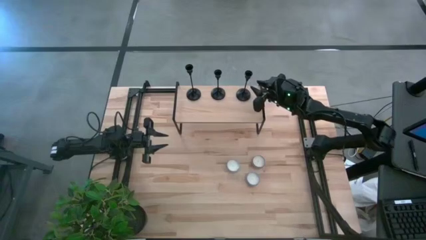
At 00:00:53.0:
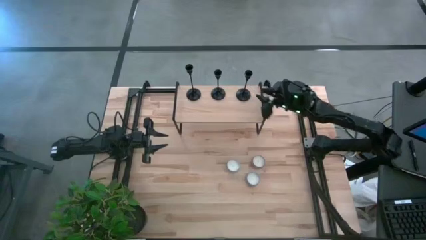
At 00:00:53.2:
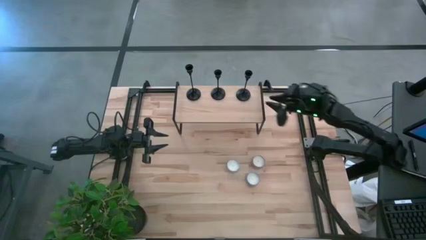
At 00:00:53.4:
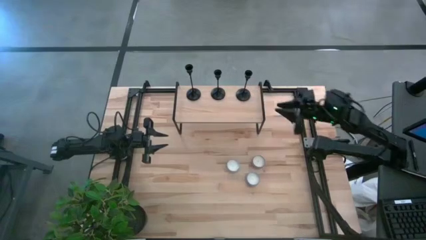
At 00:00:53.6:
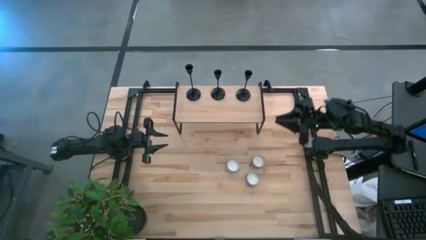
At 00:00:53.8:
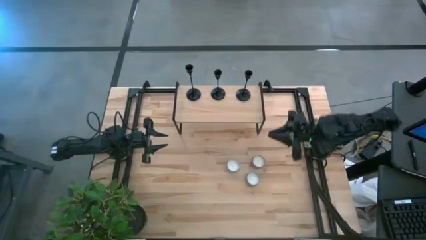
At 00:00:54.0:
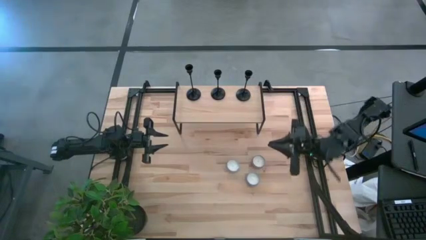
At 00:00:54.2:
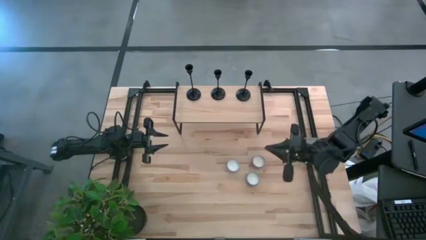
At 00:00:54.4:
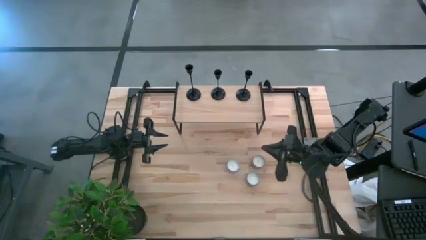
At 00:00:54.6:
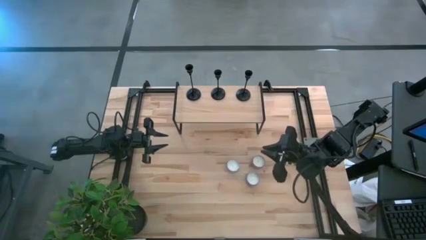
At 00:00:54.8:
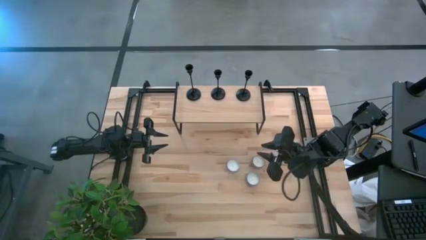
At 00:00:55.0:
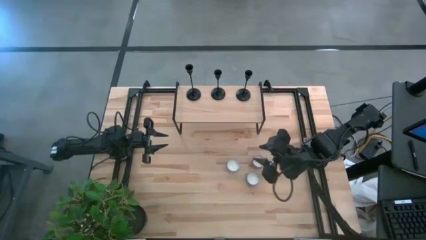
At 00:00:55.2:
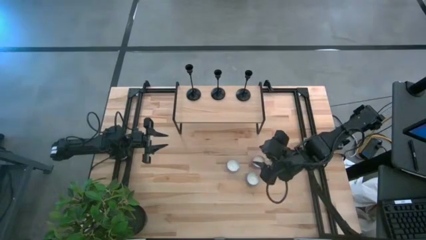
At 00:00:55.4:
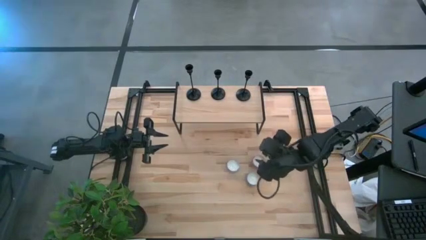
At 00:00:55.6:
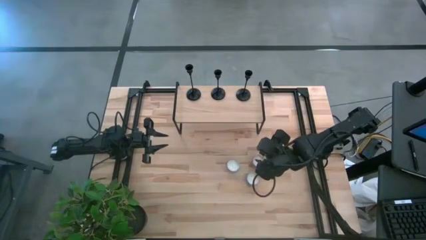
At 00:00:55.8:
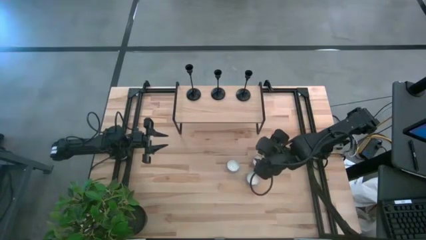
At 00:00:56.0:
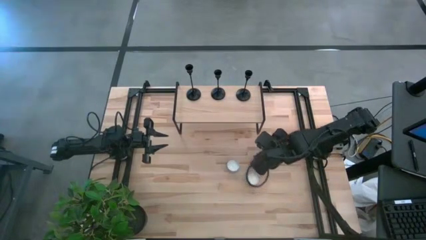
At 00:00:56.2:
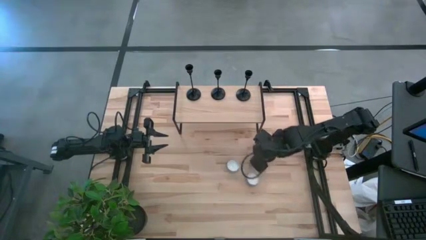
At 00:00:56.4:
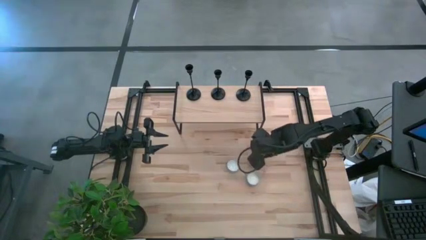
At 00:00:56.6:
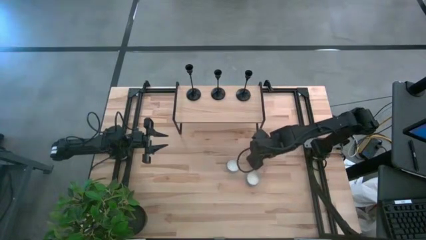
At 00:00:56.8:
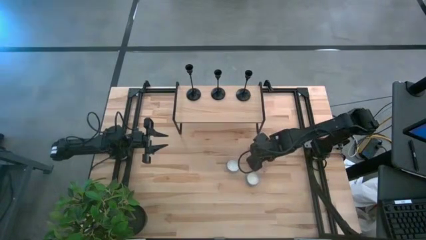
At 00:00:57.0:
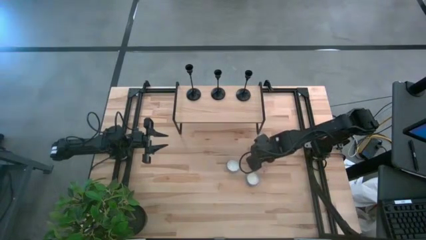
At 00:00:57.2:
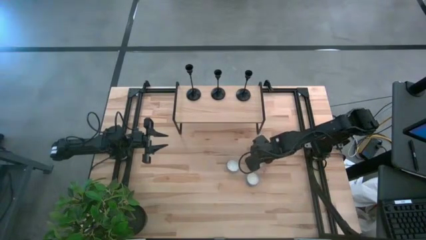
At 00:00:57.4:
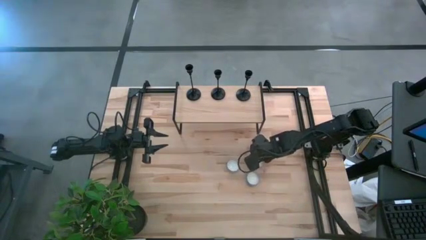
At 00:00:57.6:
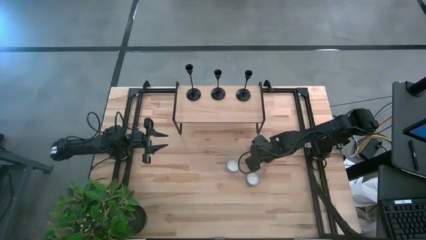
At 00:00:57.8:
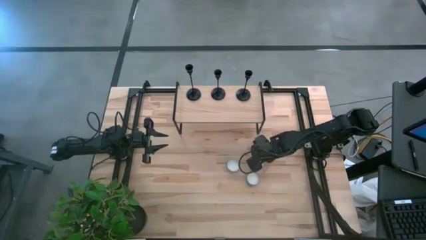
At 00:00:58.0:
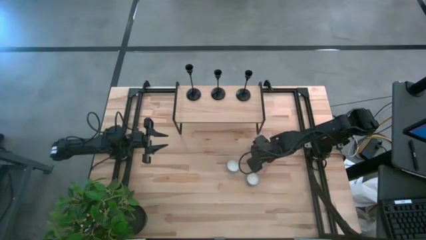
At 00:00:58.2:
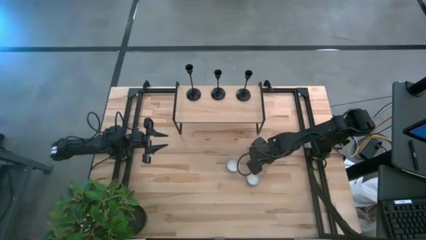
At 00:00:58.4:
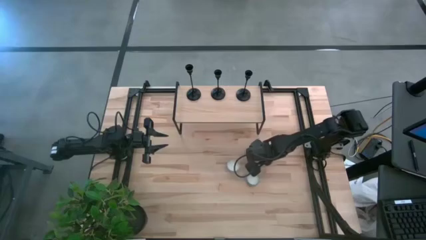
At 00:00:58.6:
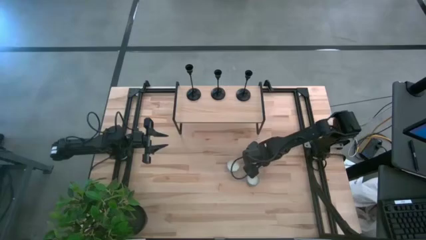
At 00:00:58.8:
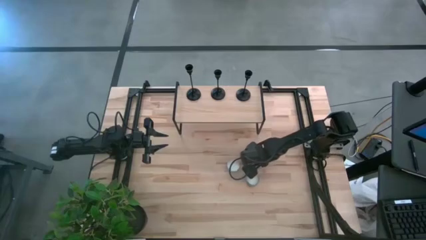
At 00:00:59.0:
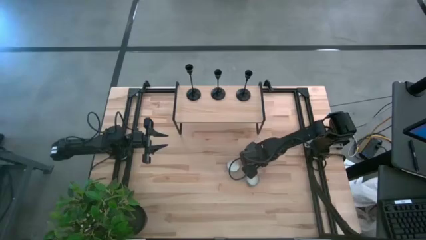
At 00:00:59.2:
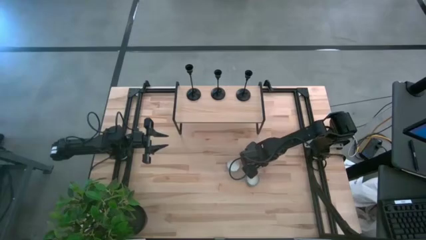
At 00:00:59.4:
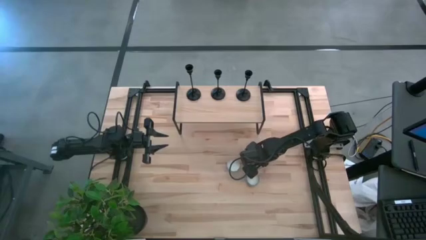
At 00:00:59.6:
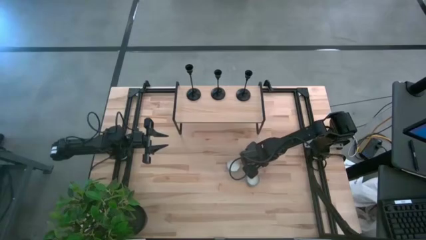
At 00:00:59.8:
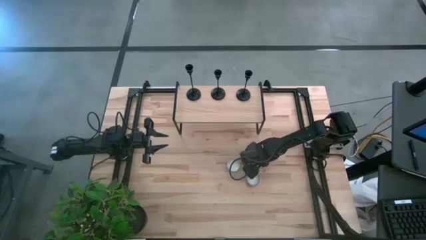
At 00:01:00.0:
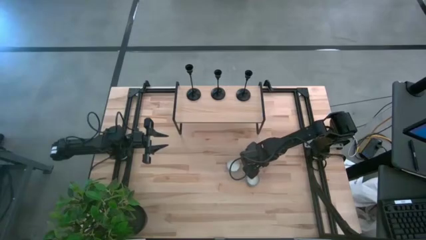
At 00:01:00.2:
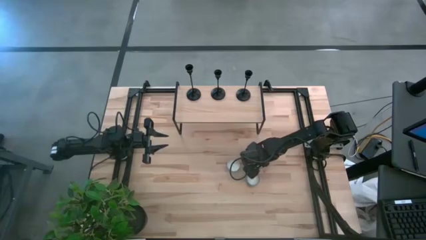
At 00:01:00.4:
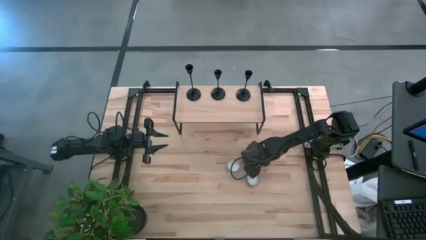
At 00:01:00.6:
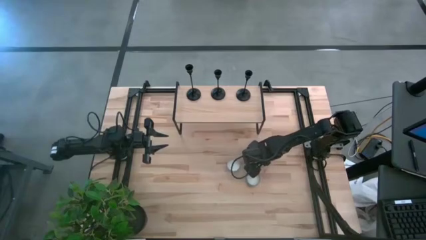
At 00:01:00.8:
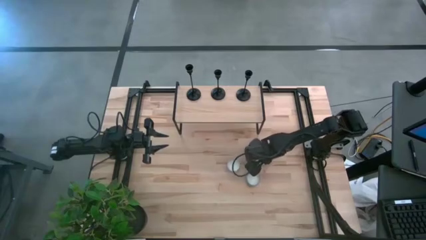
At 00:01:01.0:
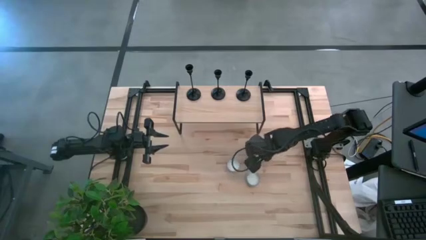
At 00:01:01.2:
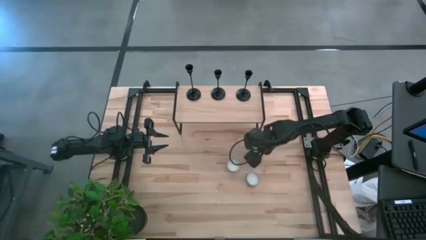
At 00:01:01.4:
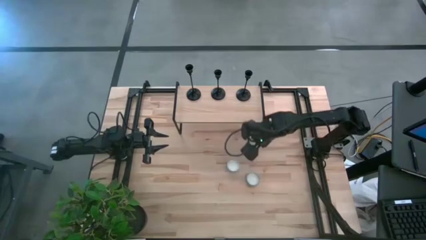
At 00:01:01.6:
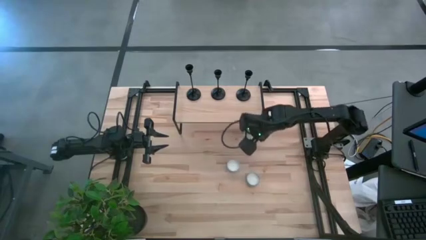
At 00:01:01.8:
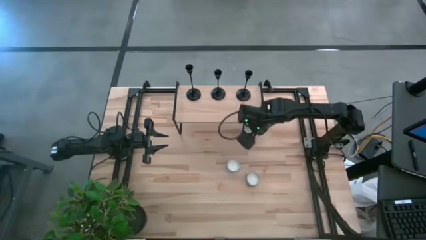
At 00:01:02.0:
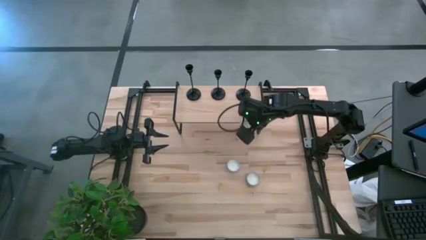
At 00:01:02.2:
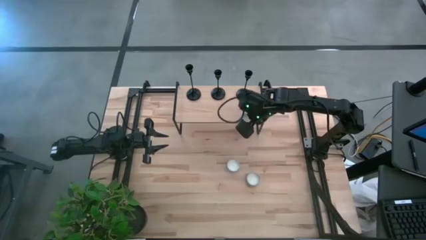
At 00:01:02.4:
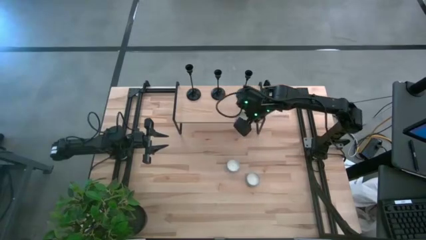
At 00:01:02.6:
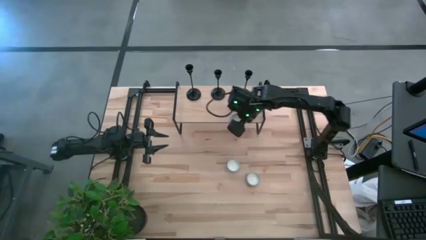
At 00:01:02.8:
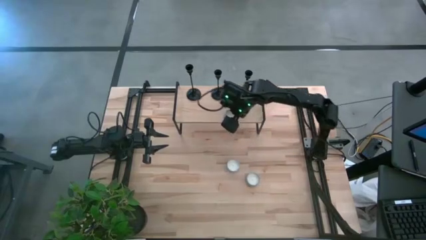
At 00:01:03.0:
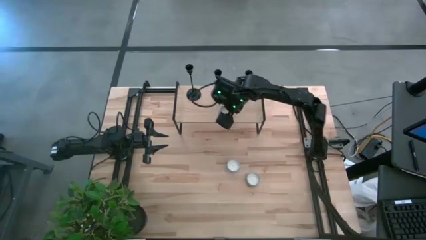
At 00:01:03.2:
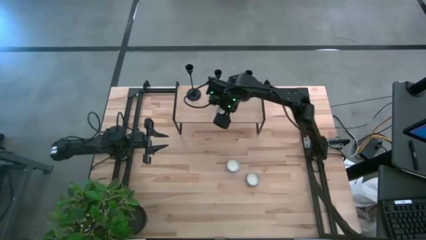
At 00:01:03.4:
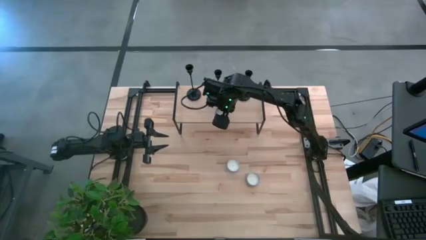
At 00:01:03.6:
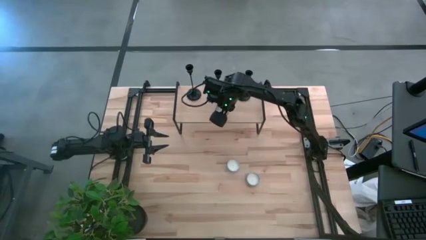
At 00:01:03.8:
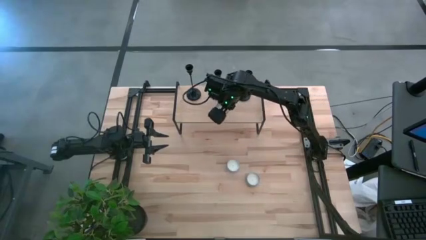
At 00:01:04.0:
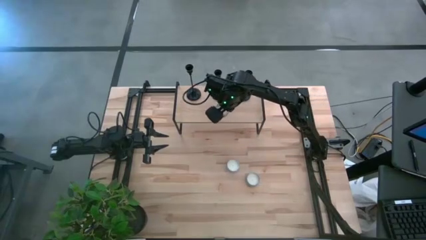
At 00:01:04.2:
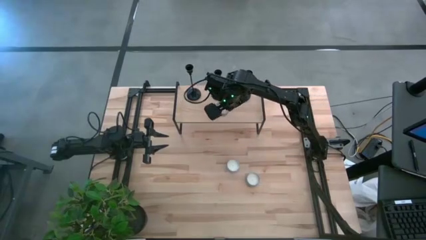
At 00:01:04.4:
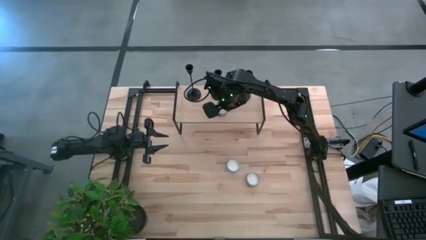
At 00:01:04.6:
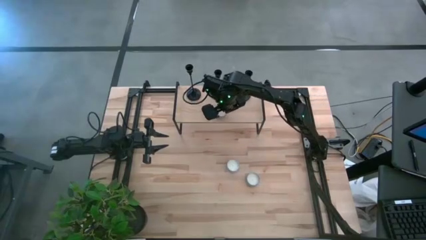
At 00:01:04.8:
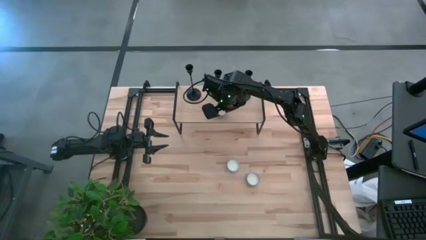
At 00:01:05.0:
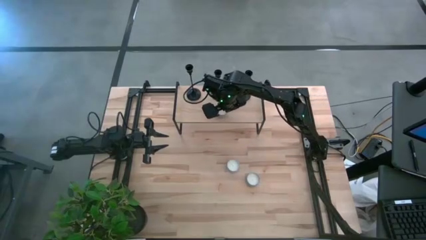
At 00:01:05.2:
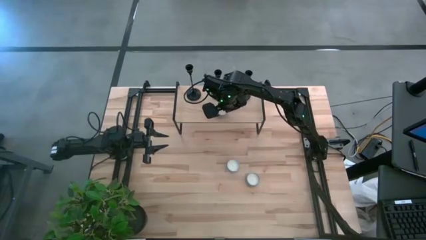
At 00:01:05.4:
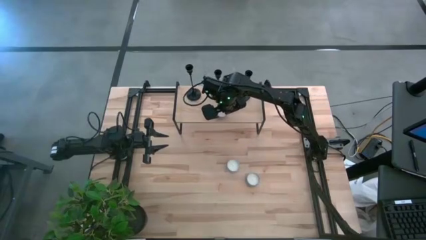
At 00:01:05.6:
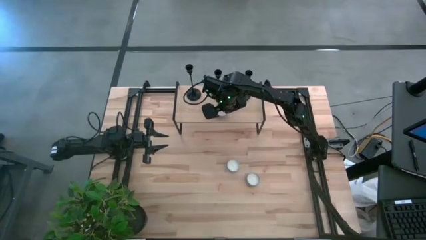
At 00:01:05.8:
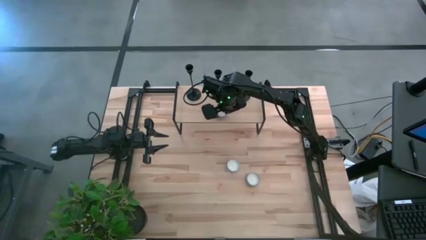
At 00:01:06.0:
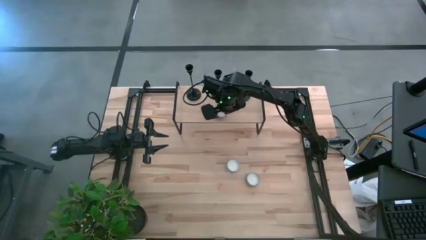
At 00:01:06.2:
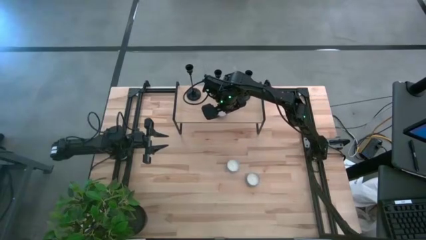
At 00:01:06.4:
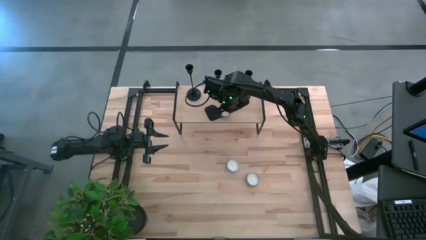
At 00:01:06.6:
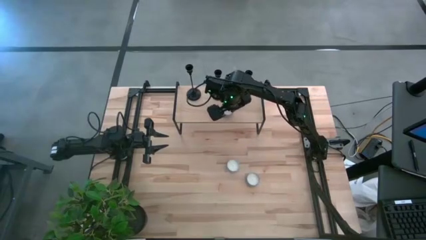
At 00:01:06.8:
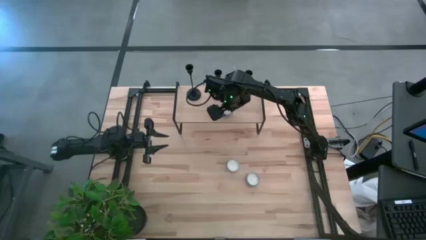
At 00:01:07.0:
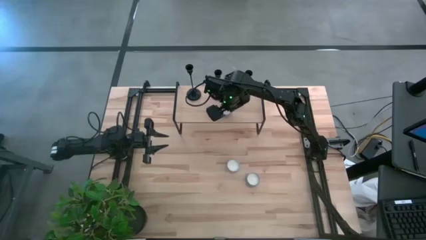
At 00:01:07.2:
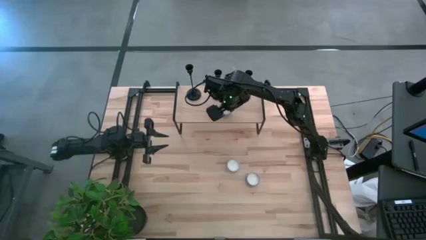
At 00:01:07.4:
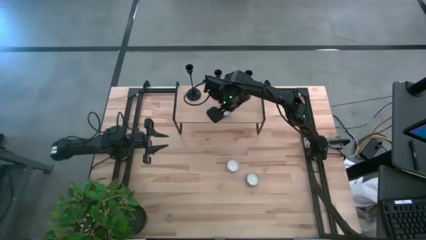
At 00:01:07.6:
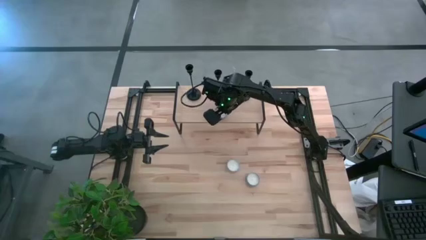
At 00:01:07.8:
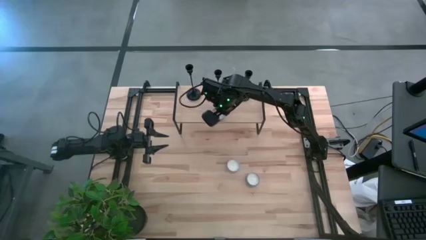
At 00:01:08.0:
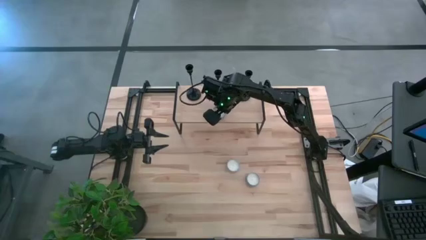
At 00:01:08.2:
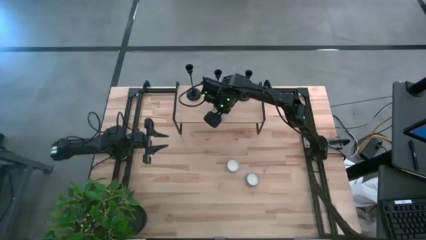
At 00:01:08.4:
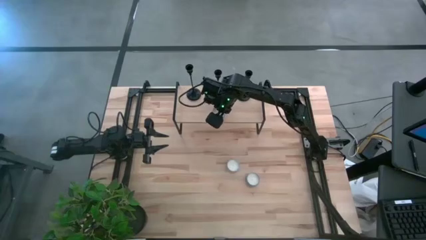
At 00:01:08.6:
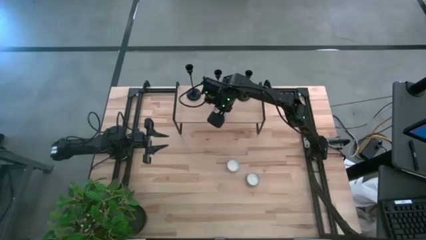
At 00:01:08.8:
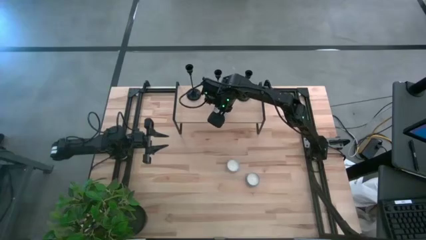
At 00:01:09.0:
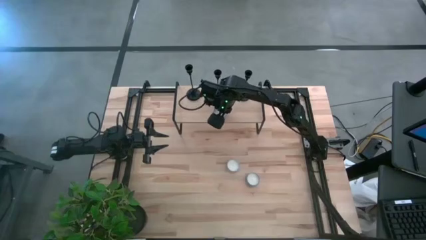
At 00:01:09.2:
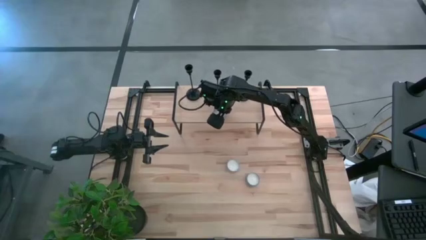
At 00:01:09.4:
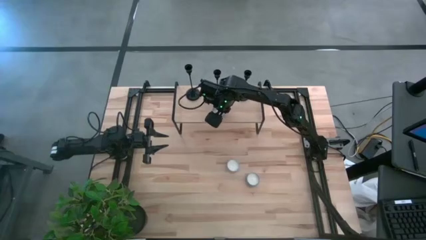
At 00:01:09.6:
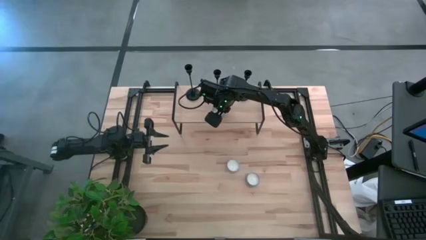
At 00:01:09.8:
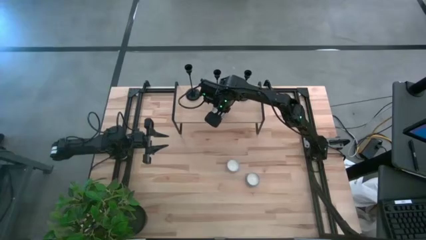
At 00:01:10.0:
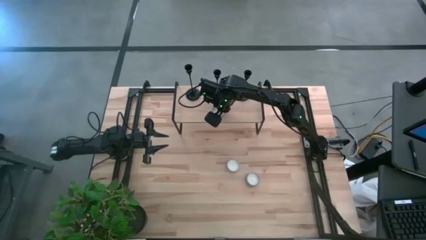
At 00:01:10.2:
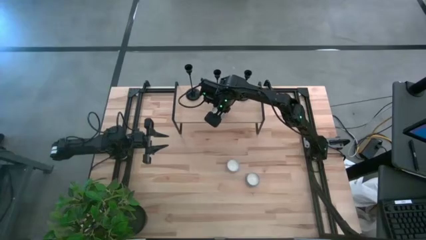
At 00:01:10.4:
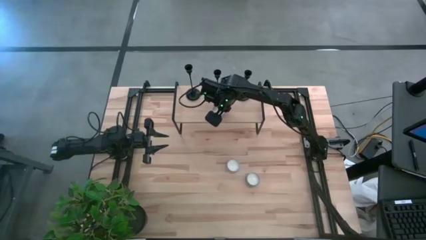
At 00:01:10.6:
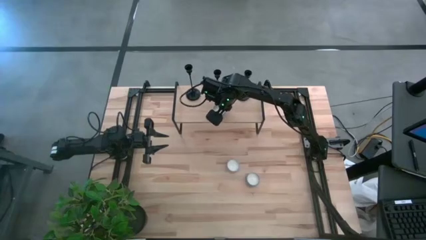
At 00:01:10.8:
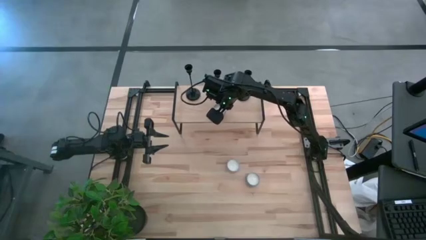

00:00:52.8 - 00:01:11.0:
Task: Pick & Place candle stick holders
Put the pink scented candle on the shelf
